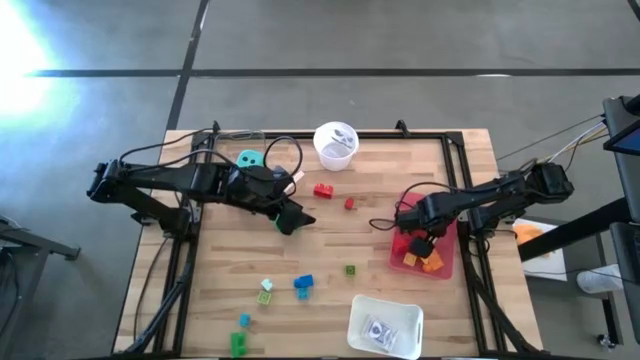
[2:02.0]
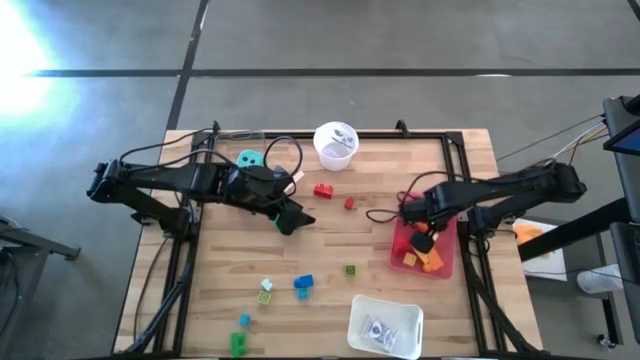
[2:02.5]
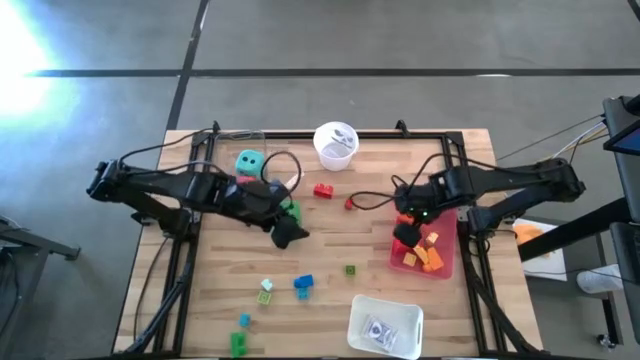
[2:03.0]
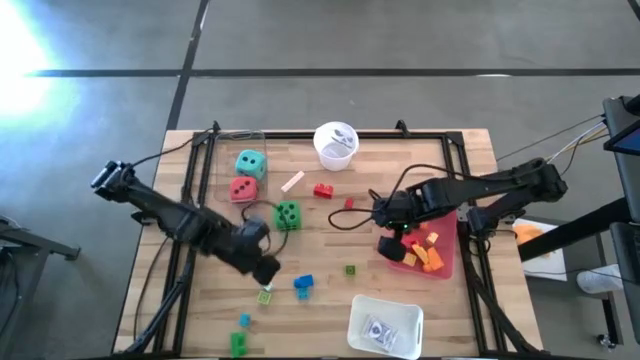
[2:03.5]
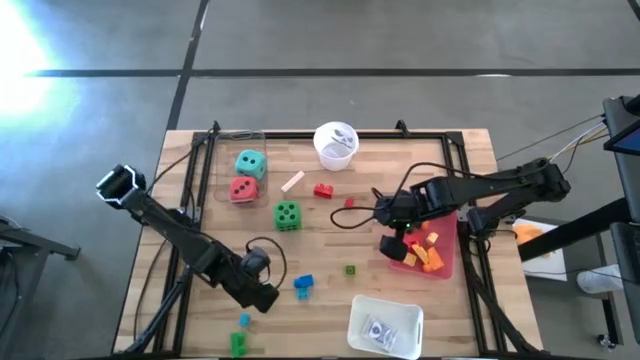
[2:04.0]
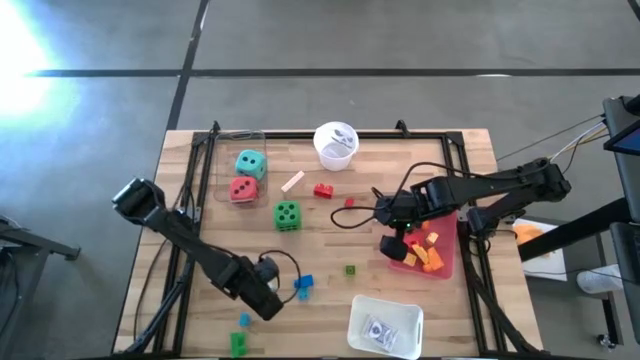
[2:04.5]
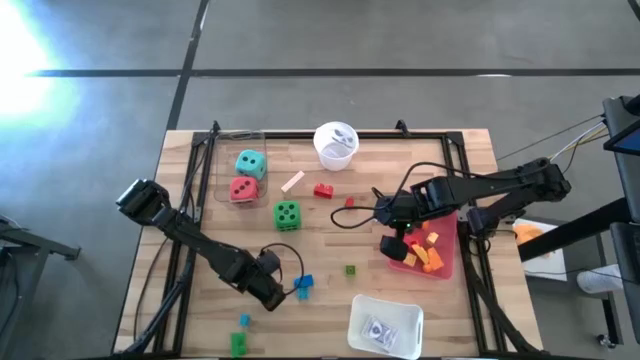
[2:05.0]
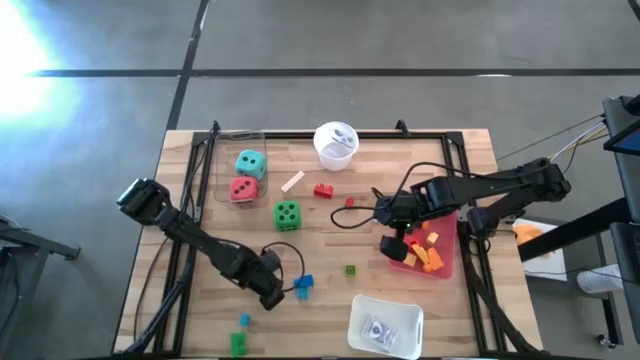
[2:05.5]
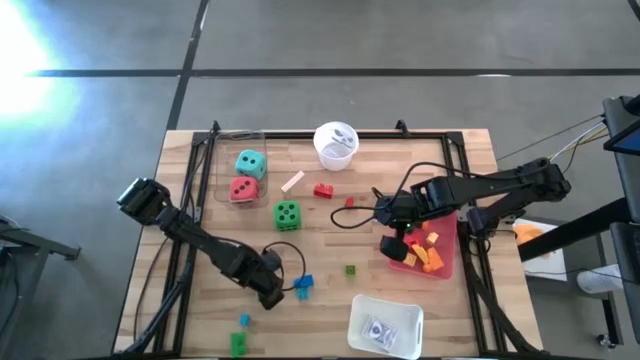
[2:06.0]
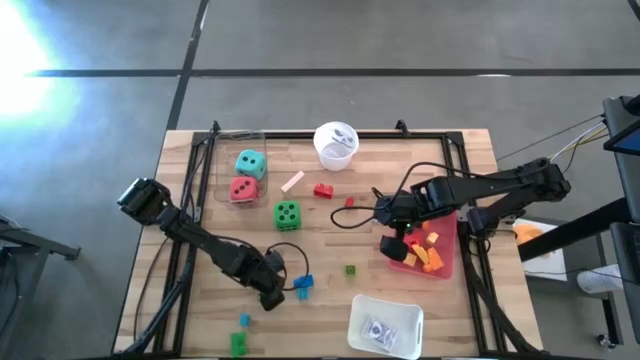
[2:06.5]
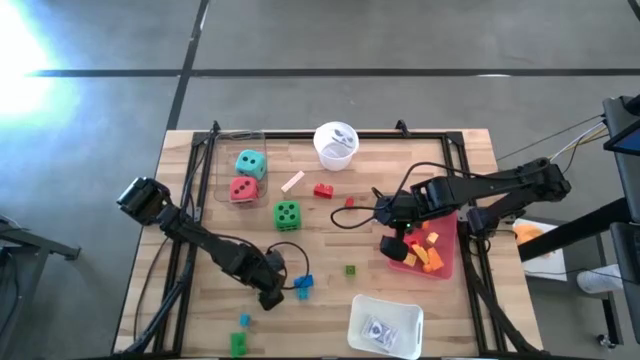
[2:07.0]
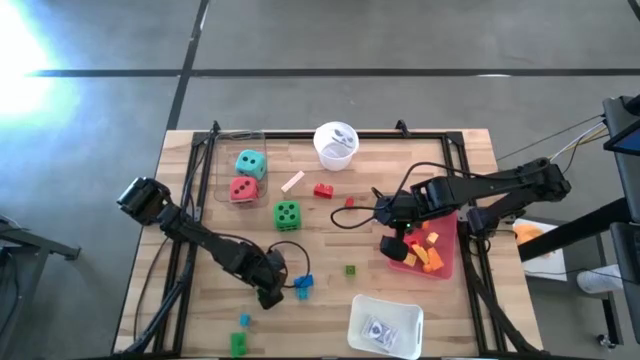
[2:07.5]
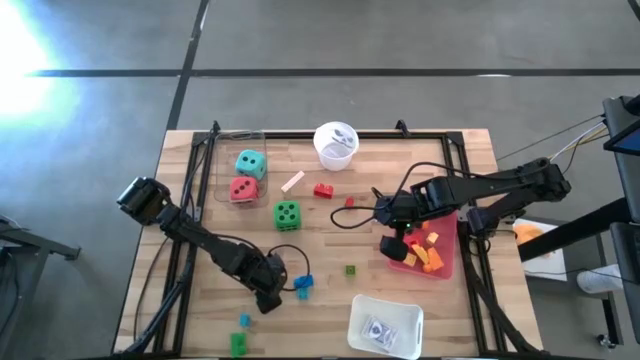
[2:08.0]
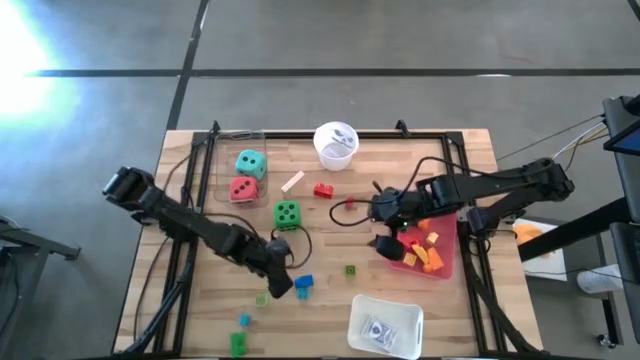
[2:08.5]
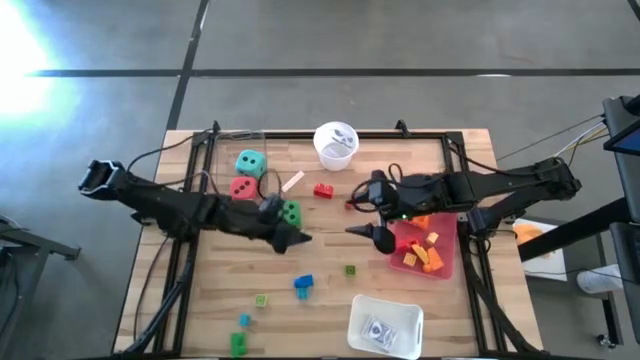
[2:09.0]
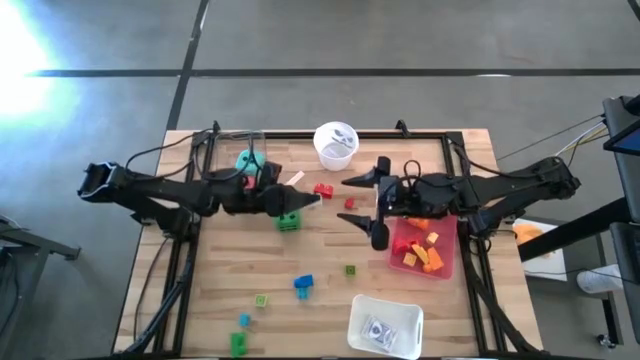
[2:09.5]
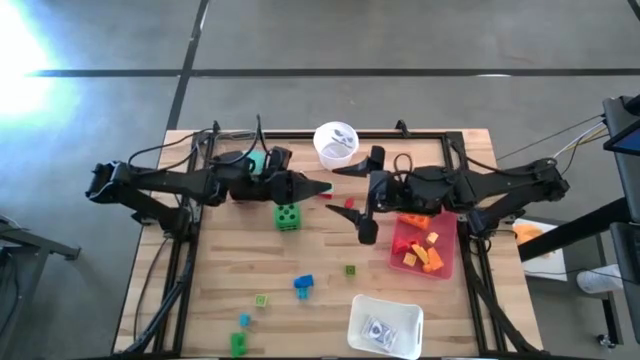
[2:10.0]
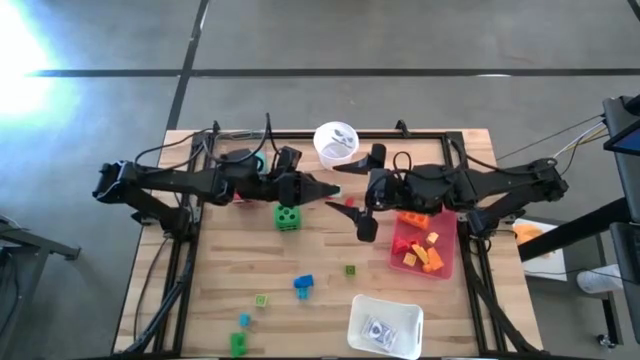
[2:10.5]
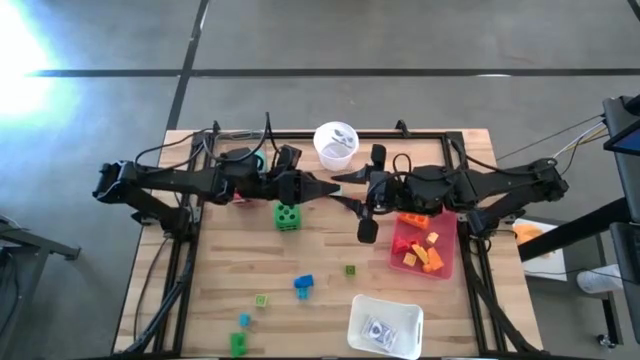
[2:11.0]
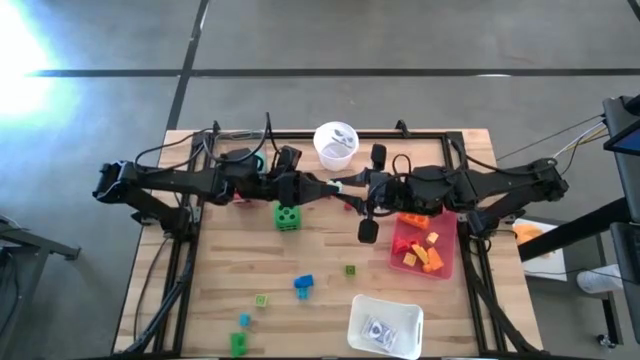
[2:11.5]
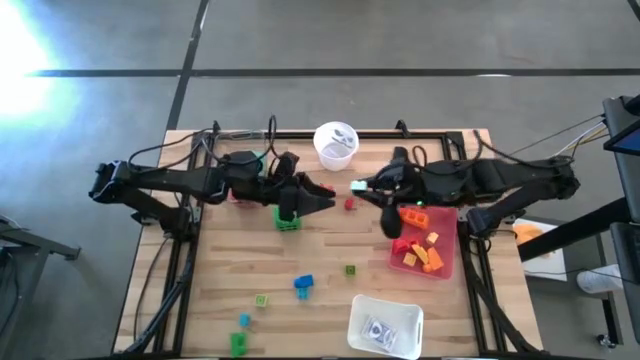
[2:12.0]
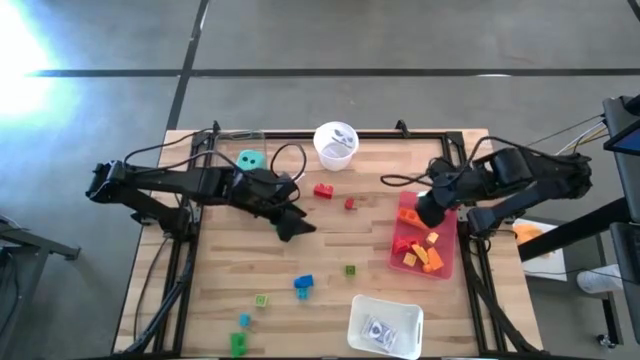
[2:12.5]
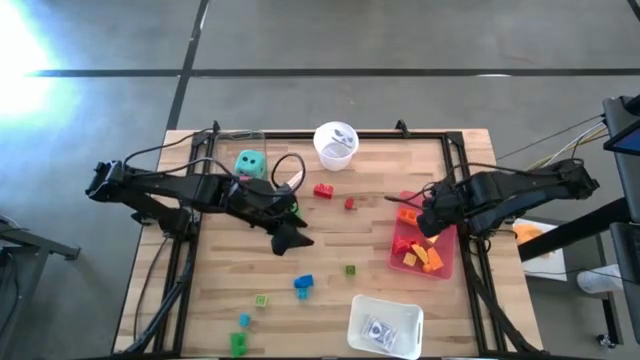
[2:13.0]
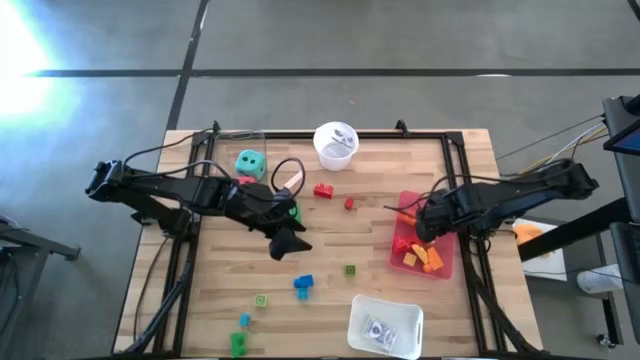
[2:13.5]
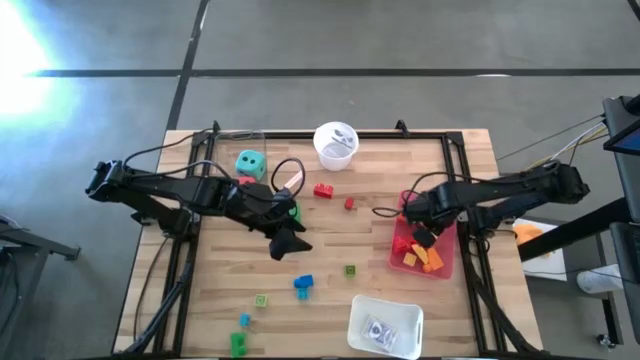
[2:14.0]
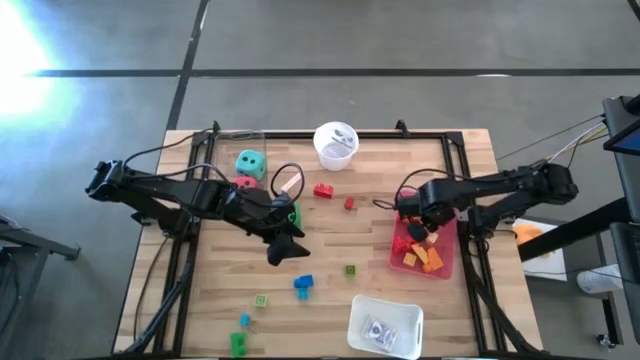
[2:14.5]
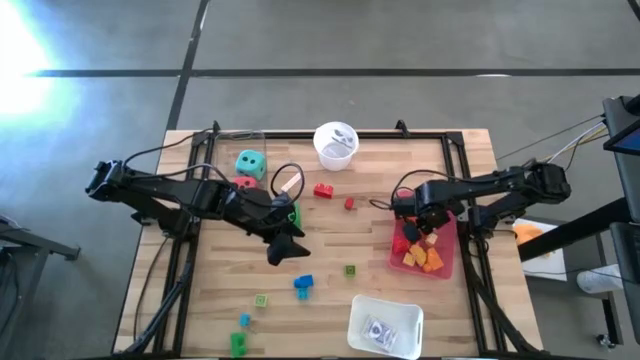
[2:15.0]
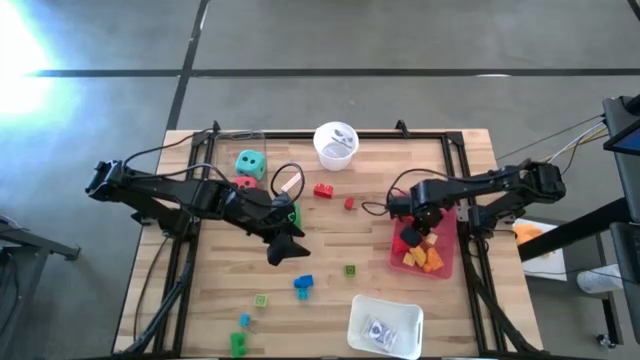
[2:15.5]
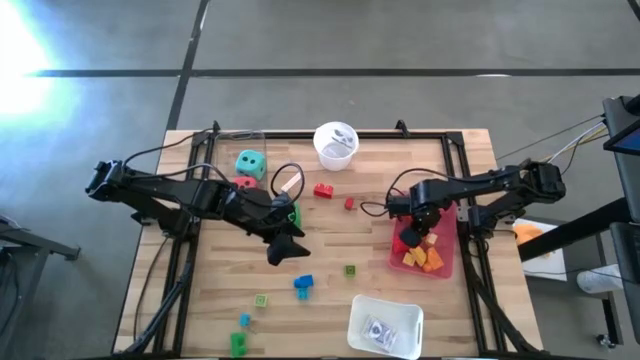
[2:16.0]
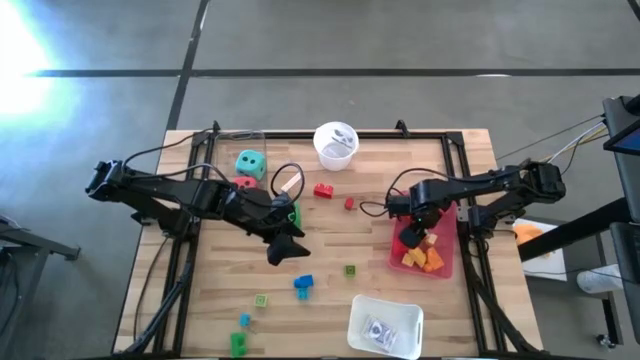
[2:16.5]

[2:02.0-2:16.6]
Task: Pick & Place Toys
Put the light blue game piece into the pink bin

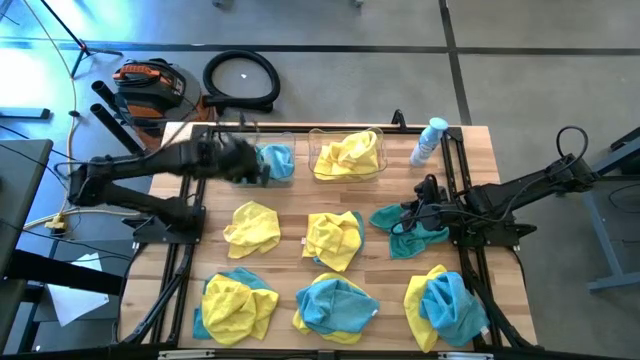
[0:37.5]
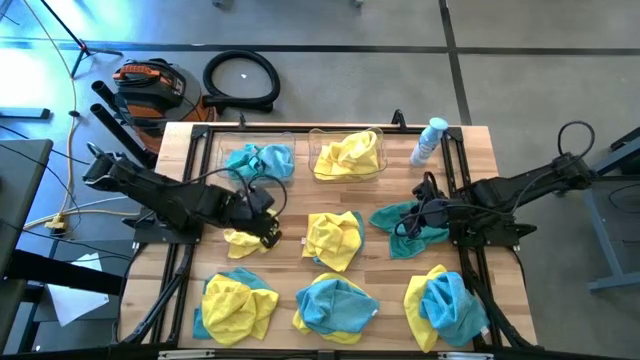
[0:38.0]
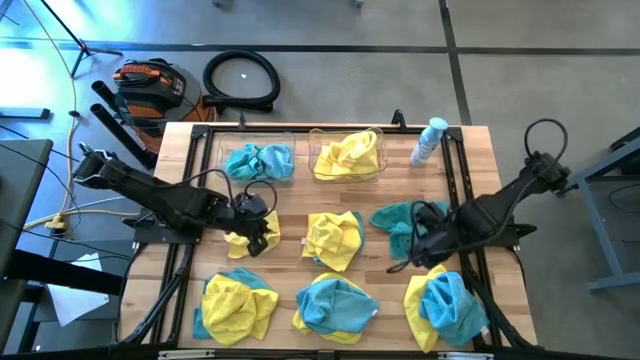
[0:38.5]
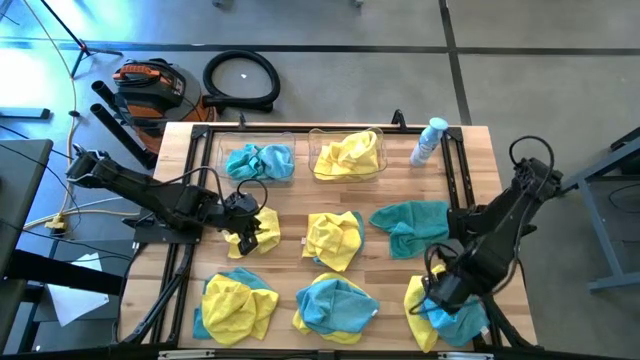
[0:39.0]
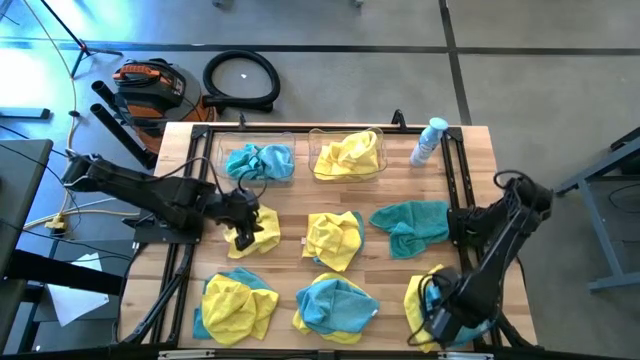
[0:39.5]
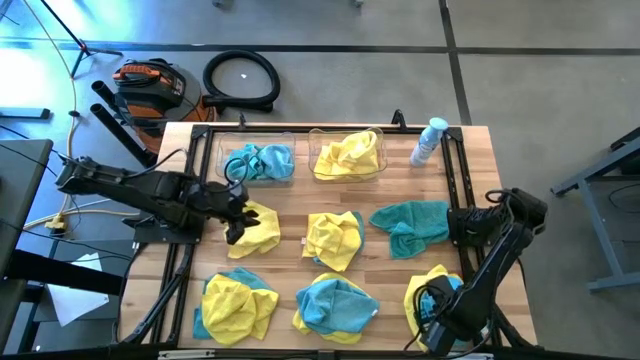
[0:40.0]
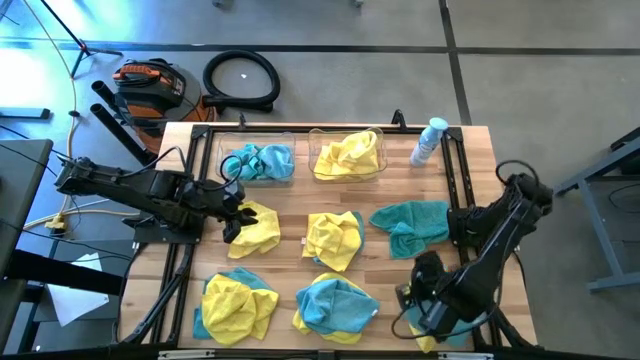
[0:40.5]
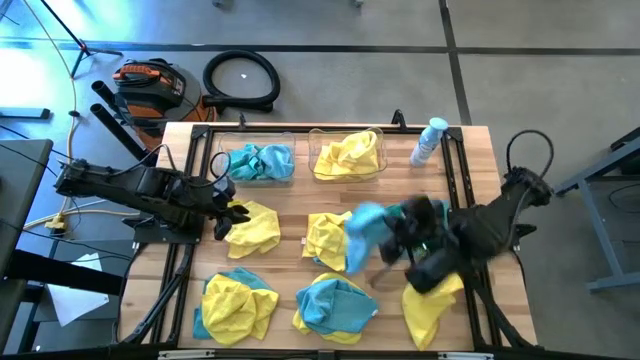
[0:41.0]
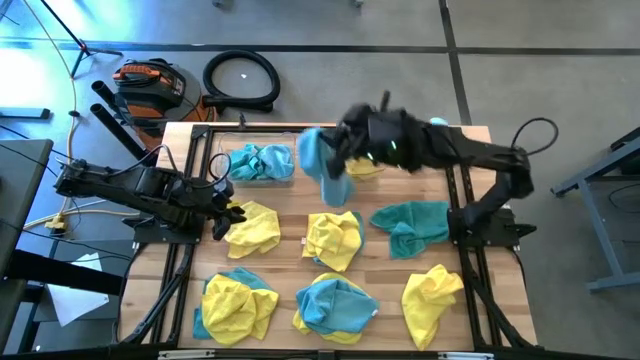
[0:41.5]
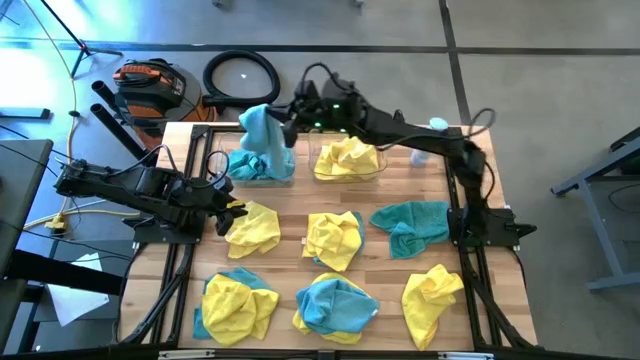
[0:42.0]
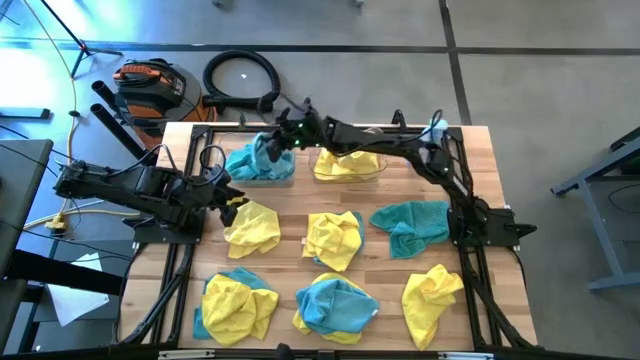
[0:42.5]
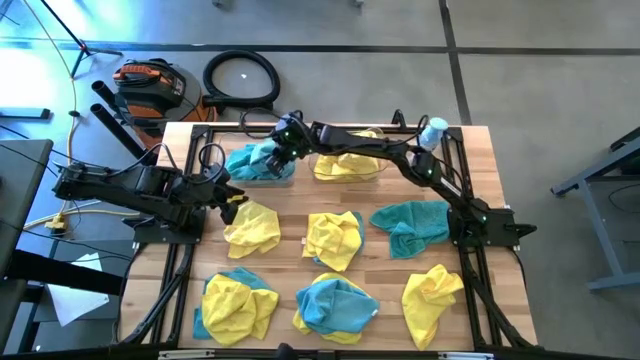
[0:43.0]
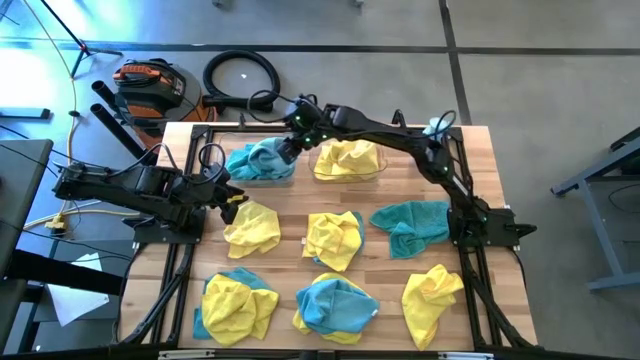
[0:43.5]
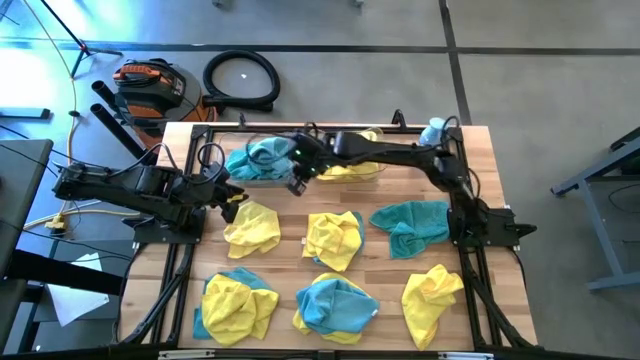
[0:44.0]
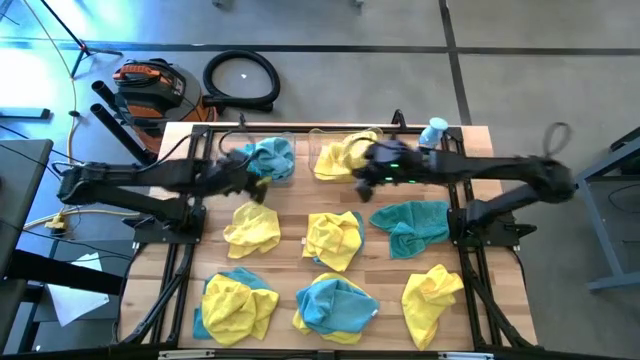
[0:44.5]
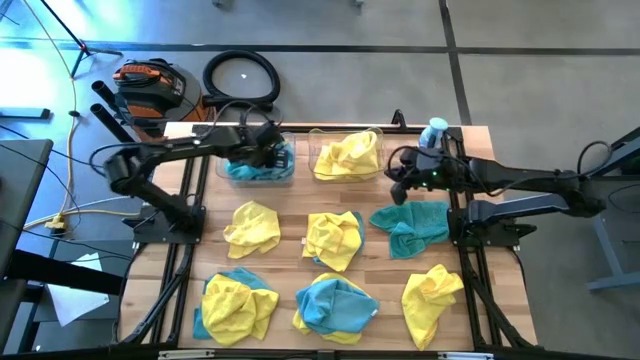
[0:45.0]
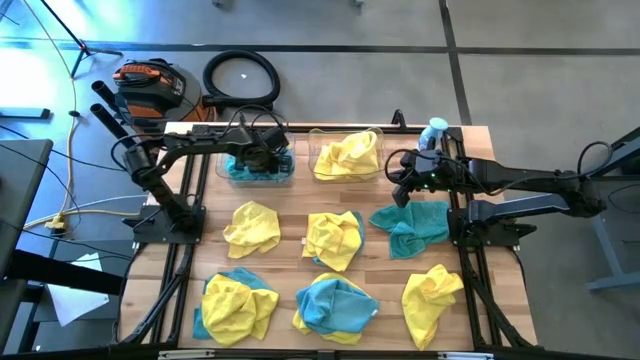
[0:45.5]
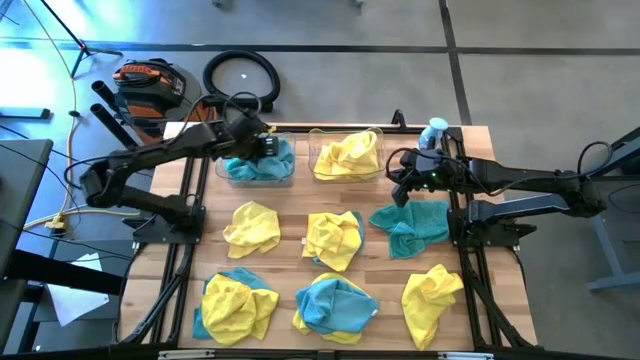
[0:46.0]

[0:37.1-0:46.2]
Task: Sort microfiber towel by color & place in baskets
Put the blue towel into the left transparent bin
